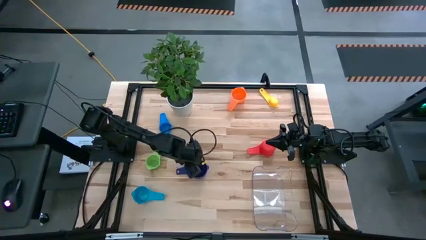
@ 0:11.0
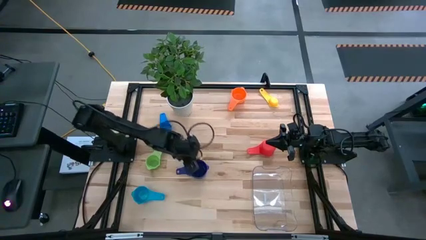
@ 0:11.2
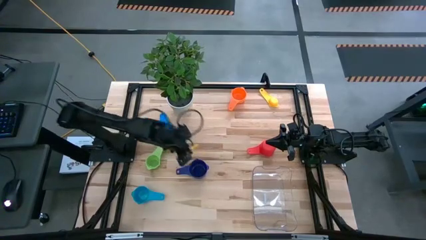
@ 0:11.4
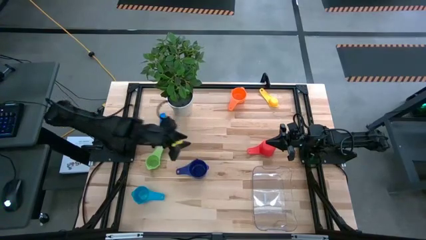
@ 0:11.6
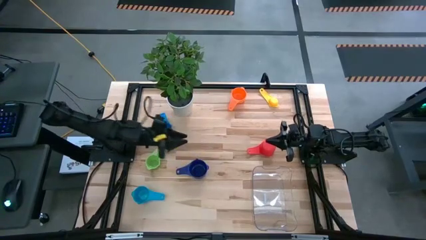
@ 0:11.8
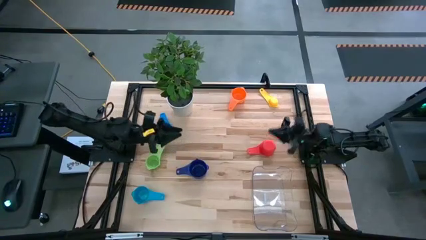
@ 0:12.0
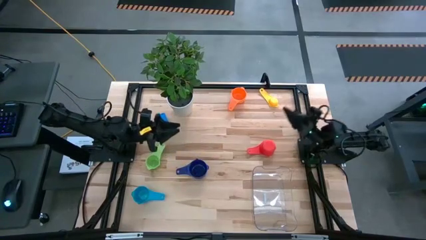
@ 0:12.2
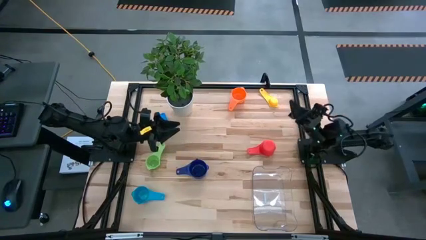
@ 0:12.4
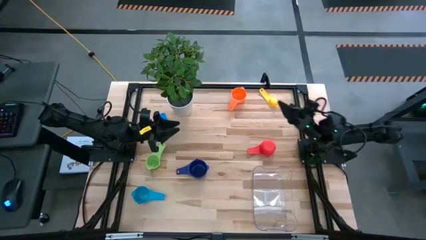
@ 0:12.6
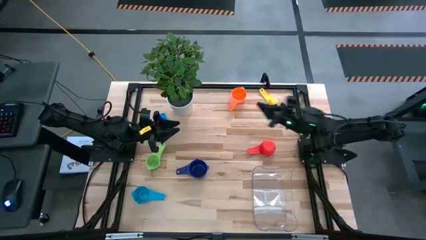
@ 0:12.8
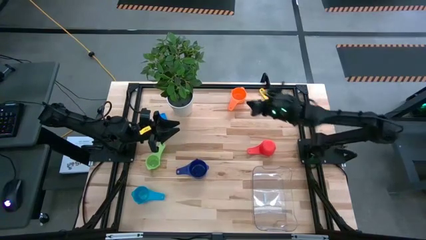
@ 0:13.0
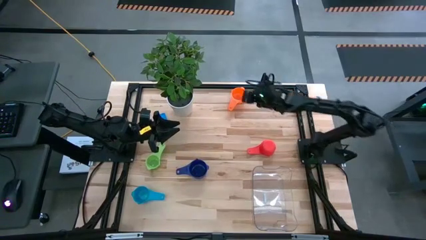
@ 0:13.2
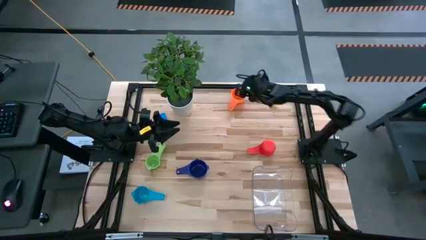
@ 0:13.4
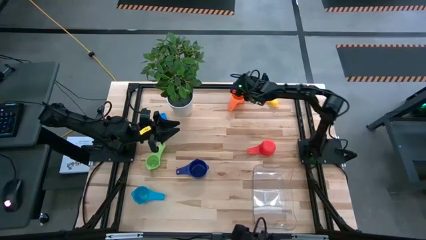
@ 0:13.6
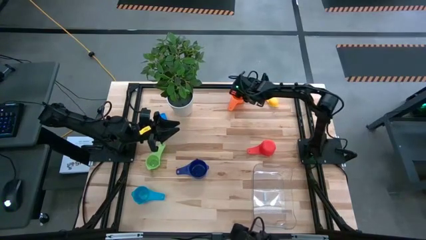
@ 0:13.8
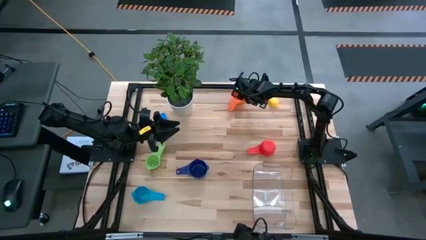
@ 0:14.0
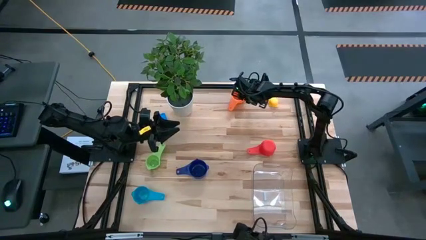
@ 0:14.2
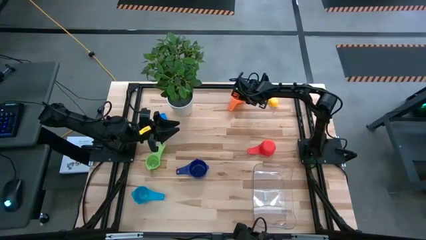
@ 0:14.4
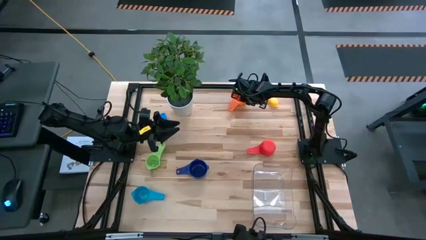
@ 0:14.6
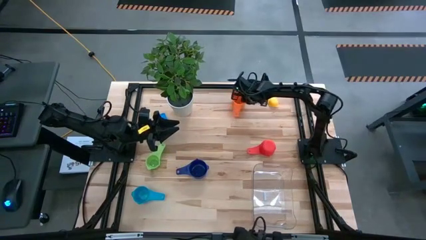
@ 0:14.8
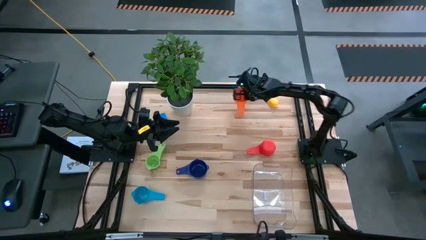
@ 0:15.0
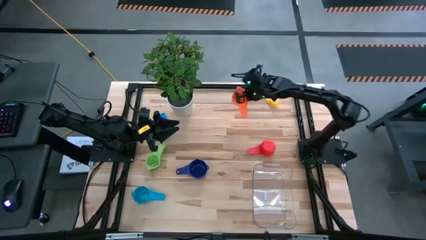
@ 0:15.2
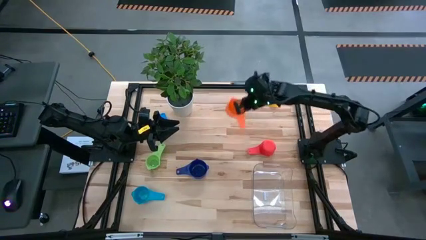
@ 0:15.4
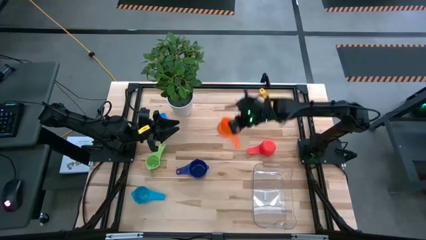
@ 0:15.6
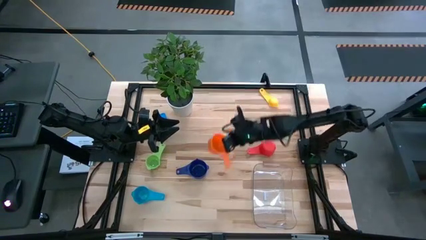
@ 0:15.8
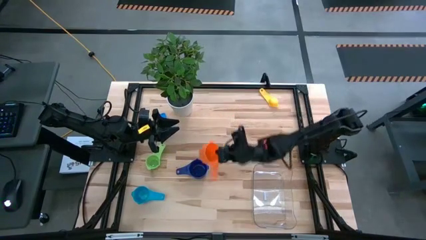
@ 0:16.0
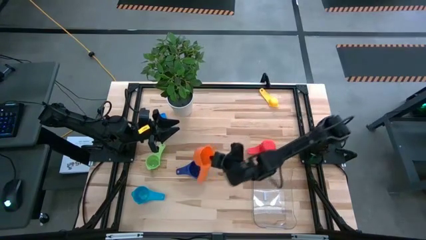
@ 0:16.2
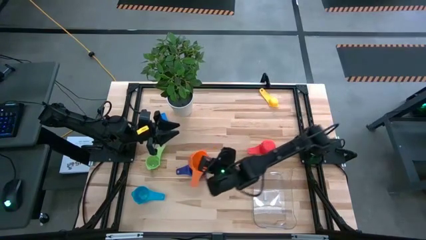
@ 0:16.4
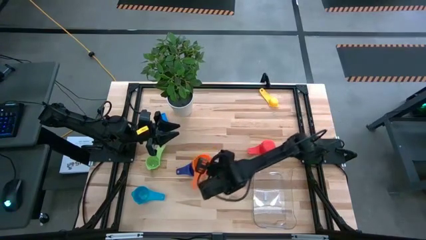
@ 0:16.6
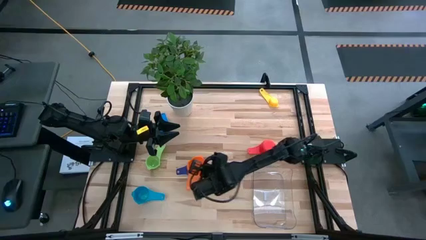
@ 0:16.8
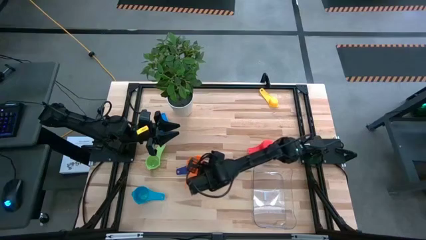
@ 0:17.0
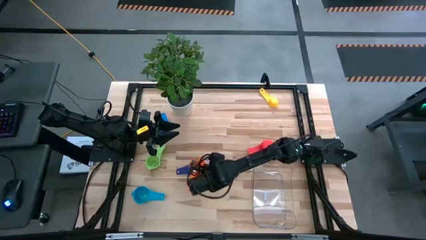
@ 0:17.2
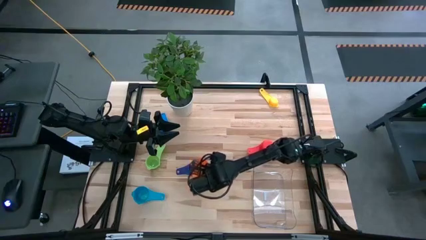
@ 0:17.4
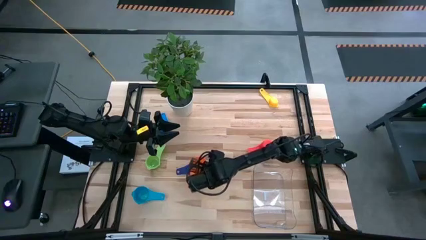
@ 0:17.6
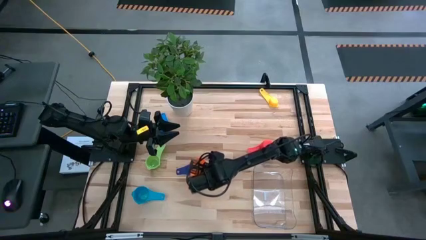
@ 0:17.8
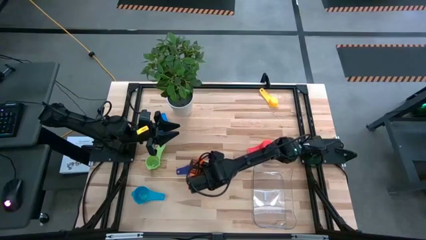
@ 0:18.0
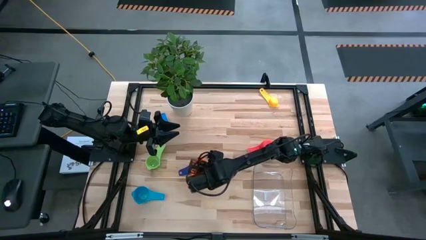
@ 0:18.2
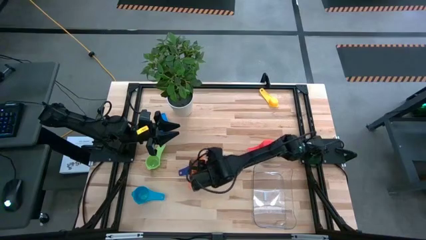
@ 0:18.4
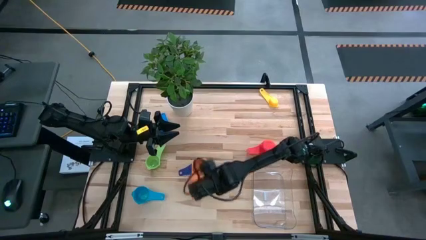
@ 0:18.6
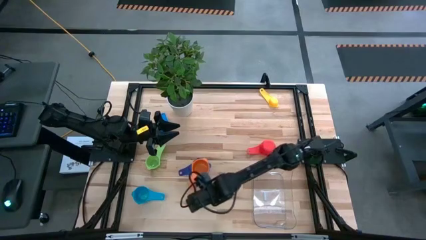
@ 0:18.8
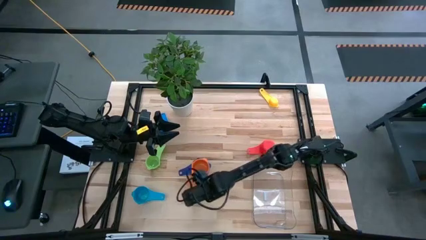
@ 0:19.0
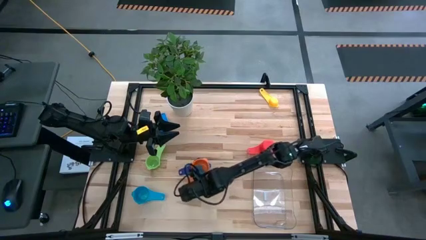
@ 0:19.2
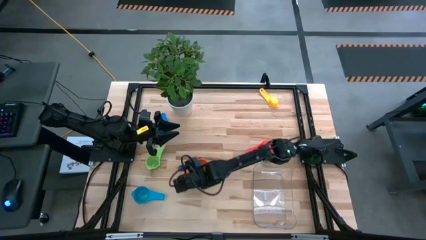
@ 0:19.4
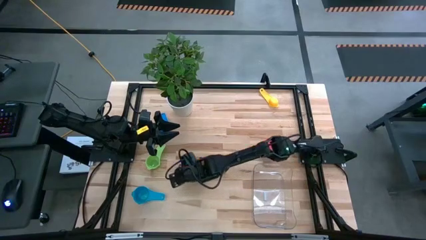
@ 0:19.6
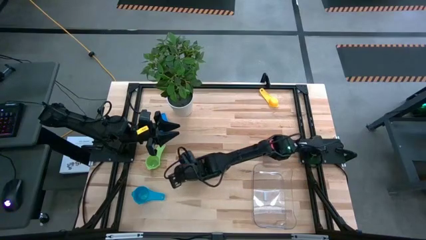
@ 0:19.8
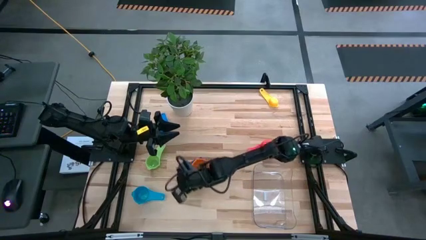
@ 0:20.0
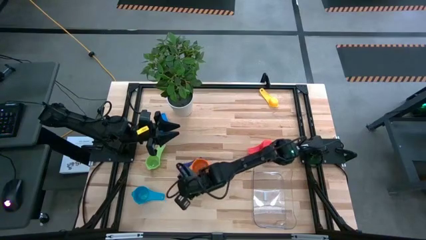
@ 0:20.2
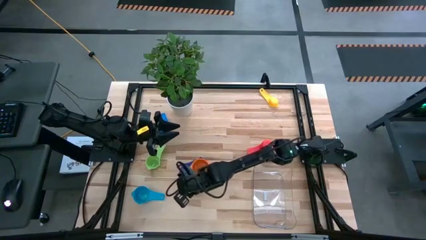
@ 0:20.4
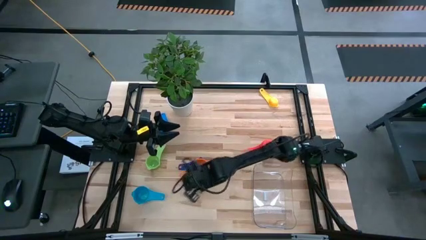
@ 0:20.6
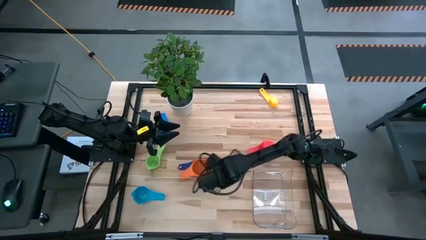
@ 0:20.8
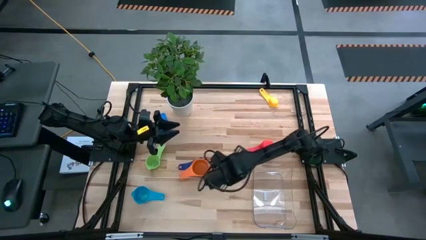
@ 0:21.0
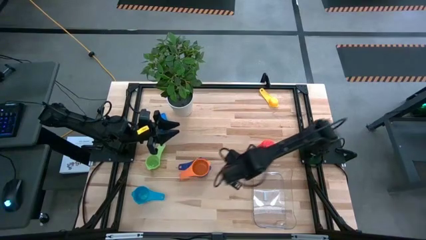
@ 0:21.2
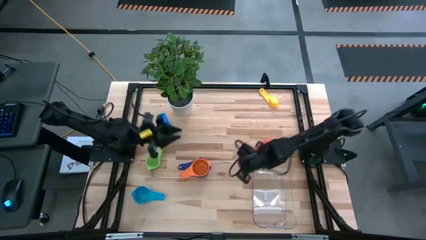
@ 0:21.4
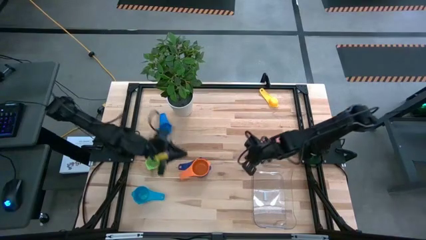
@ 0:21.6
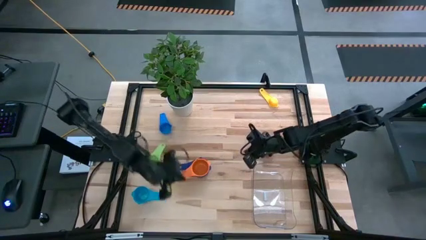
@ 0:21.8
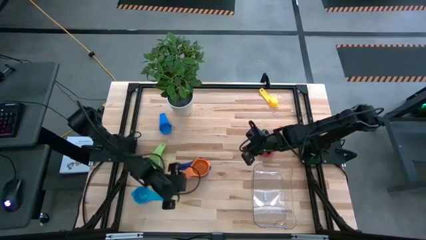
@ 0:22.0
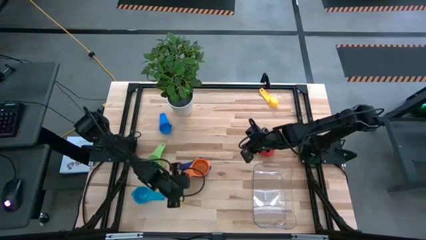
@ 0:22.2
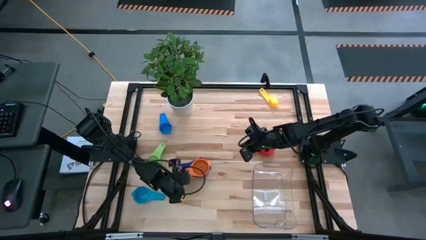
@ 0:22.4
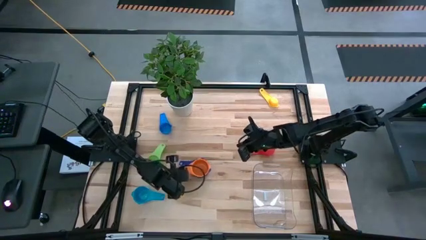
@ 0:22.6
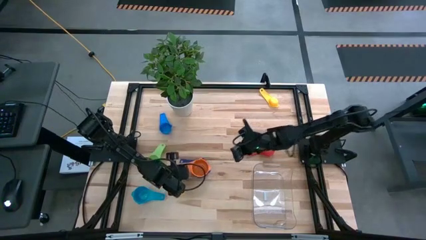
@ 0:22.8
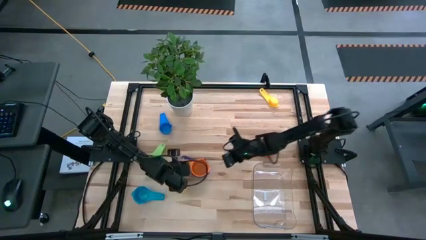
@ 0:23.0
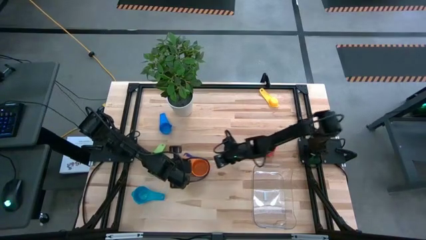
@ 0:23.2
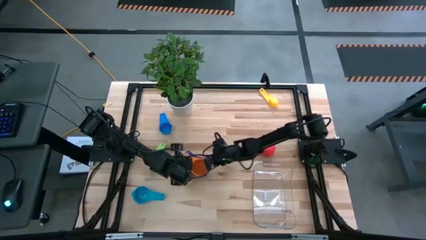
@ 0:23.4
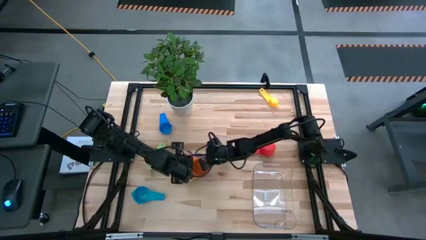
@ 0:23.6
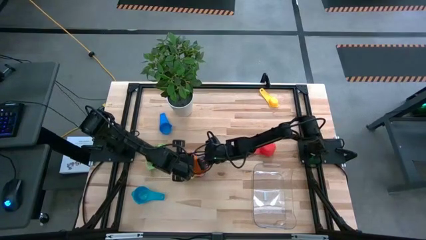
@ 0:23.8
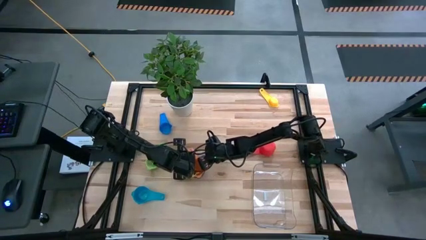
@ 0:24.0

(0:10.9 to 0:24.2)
Task: Nest measuring cups in basket
Stack the orange measuring cup on top of the dark blue measuring cup
